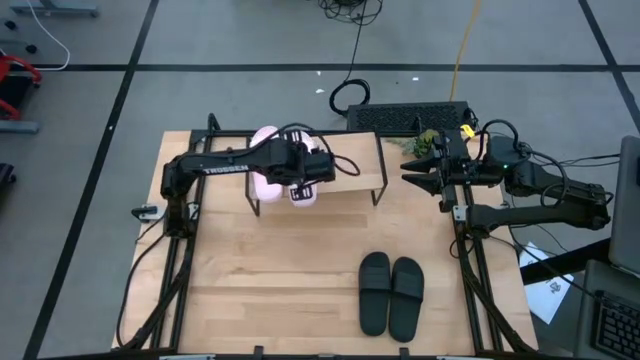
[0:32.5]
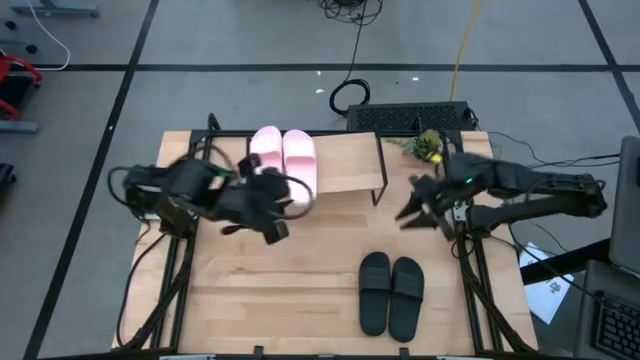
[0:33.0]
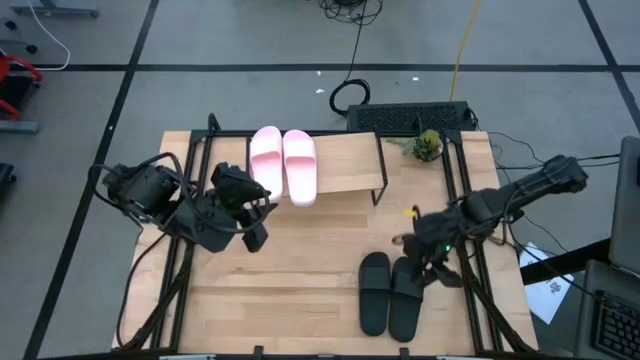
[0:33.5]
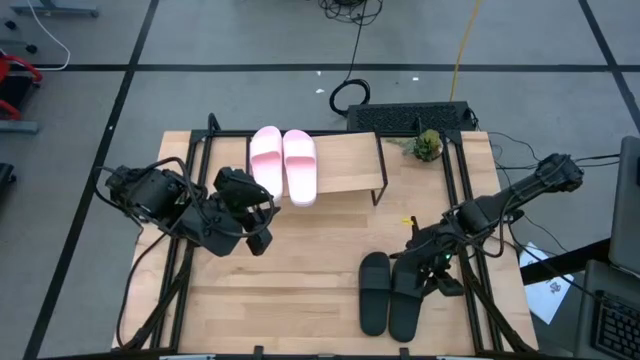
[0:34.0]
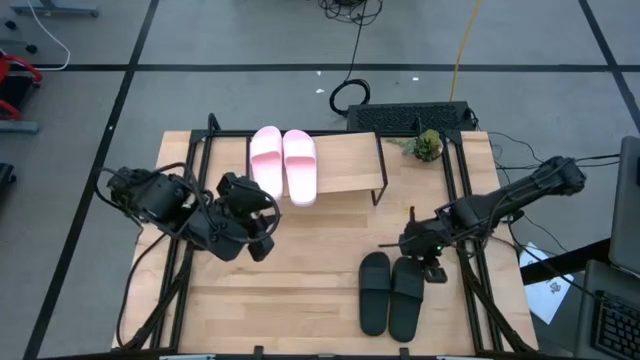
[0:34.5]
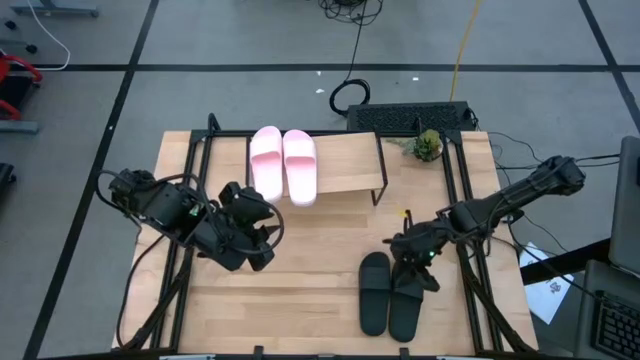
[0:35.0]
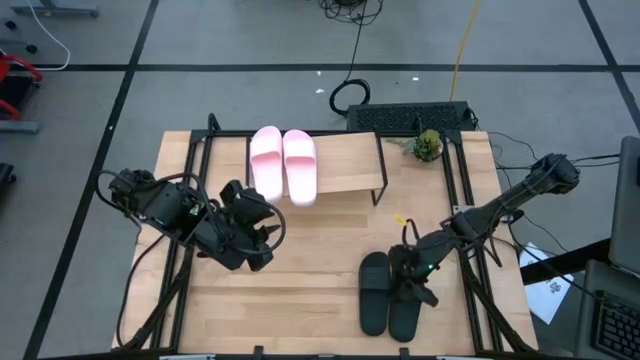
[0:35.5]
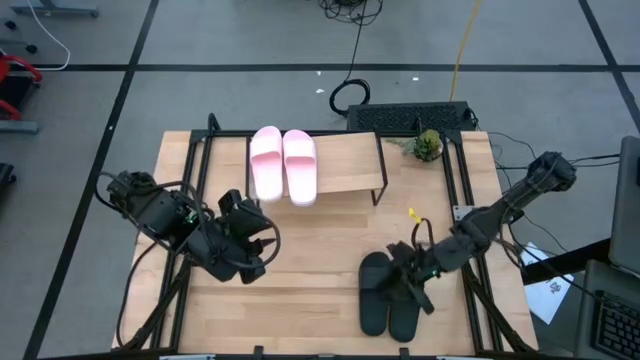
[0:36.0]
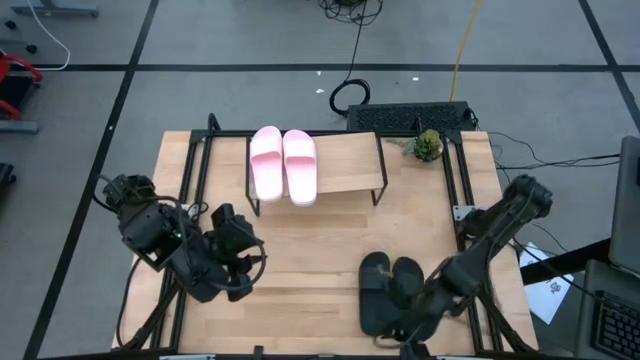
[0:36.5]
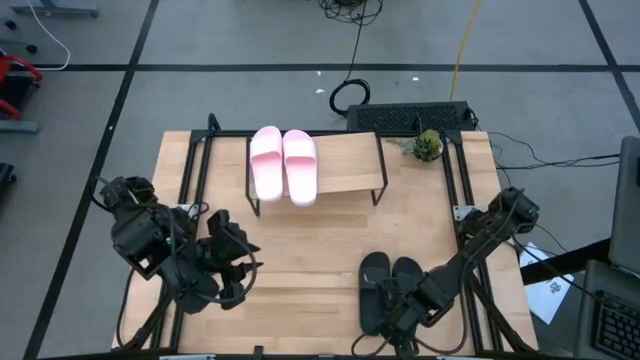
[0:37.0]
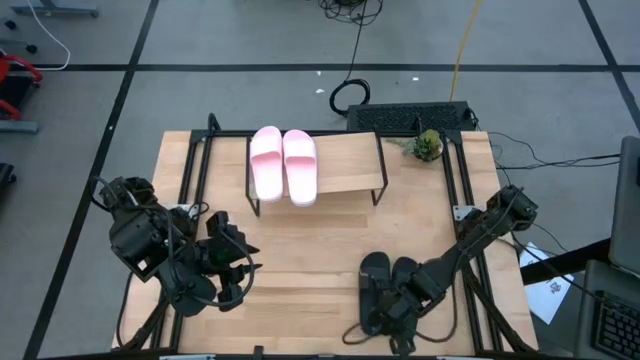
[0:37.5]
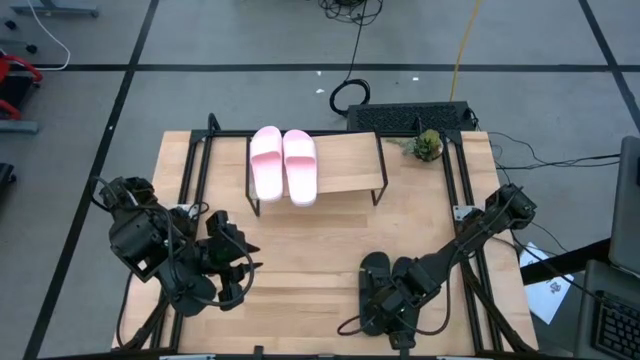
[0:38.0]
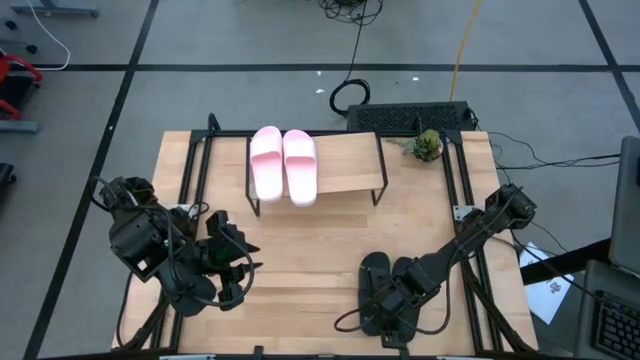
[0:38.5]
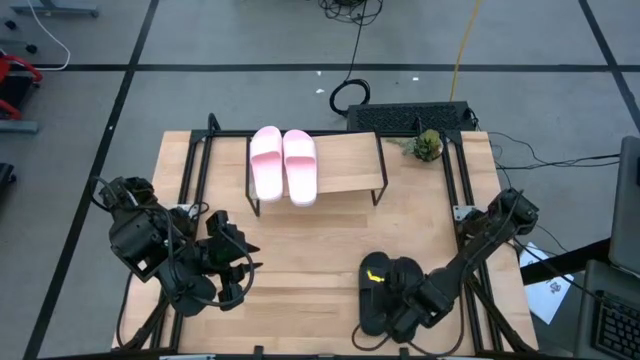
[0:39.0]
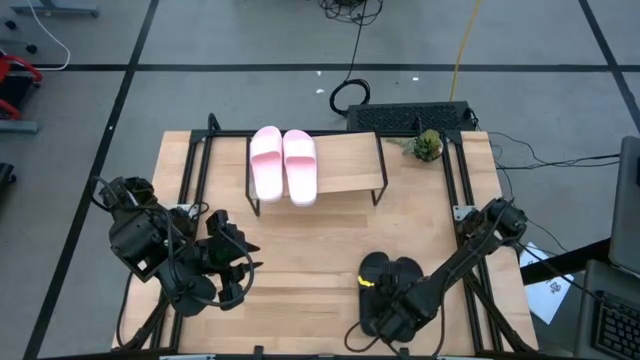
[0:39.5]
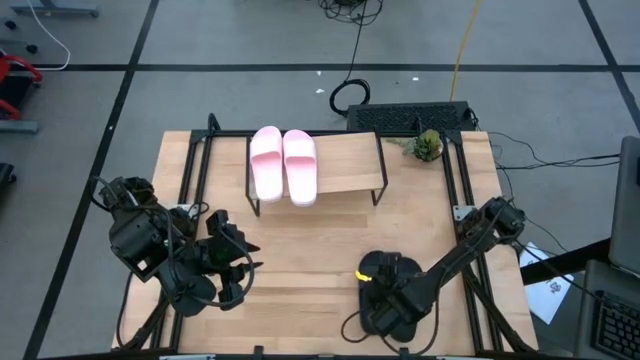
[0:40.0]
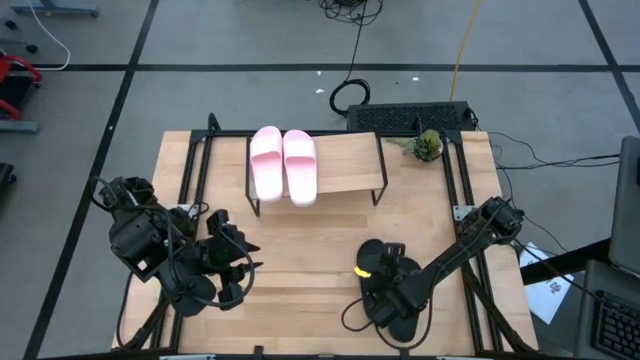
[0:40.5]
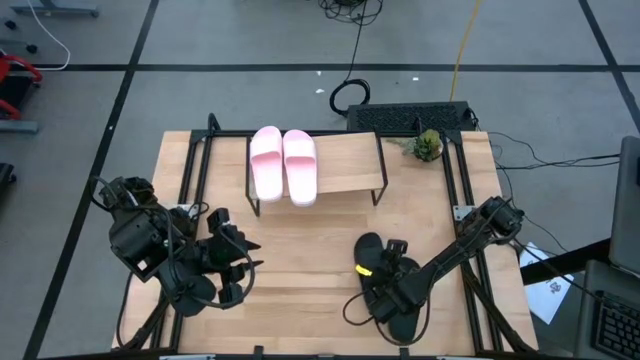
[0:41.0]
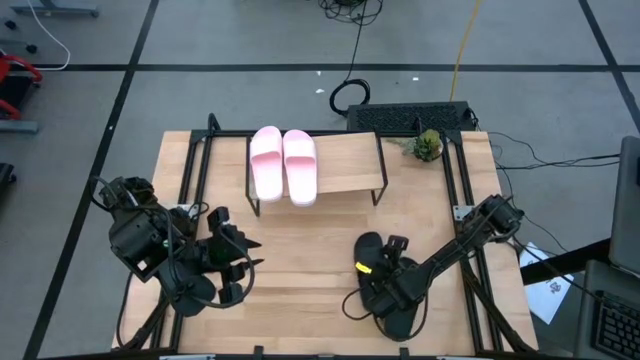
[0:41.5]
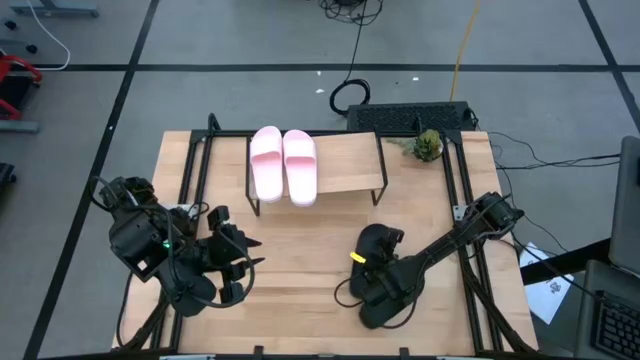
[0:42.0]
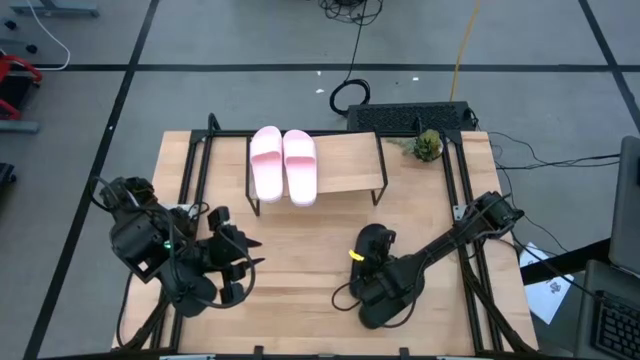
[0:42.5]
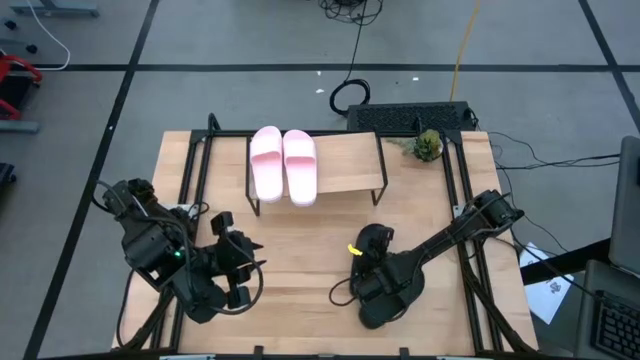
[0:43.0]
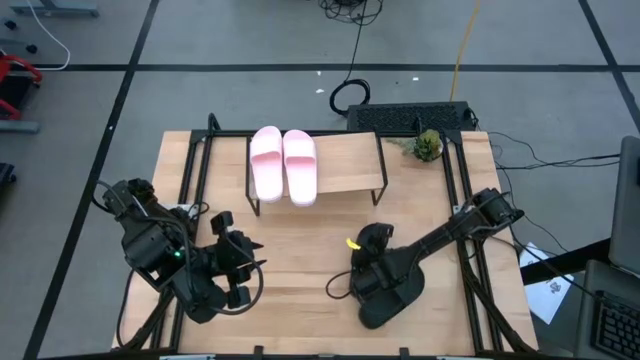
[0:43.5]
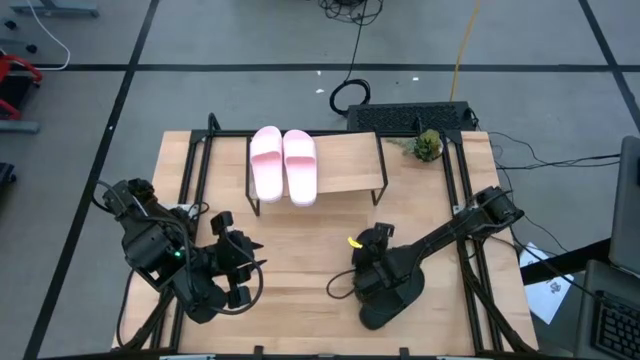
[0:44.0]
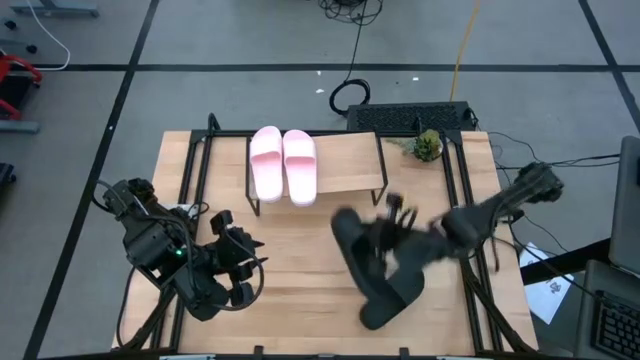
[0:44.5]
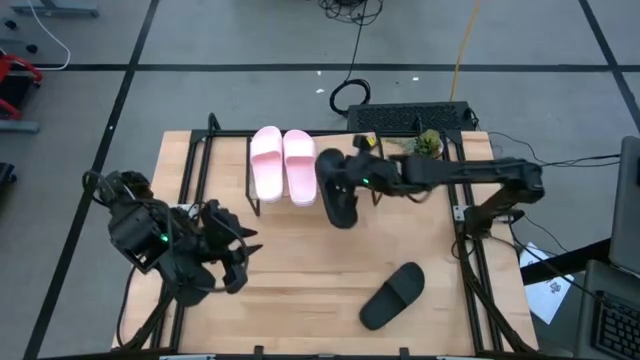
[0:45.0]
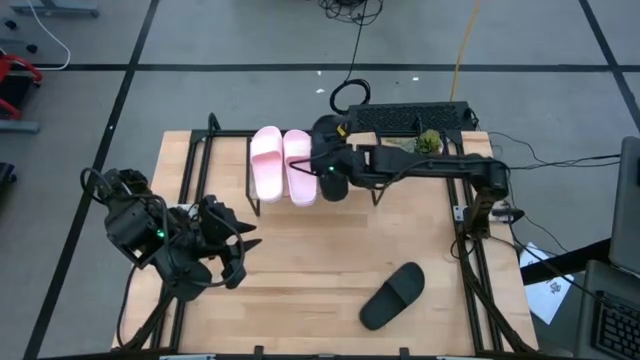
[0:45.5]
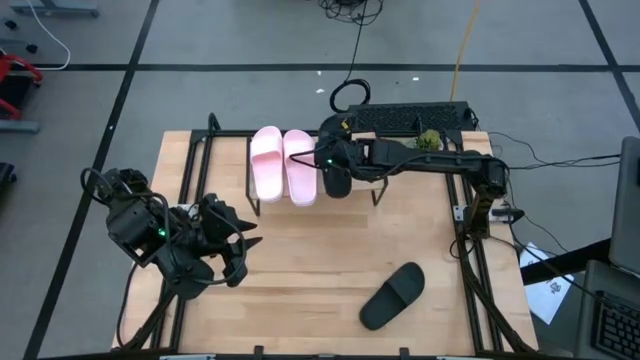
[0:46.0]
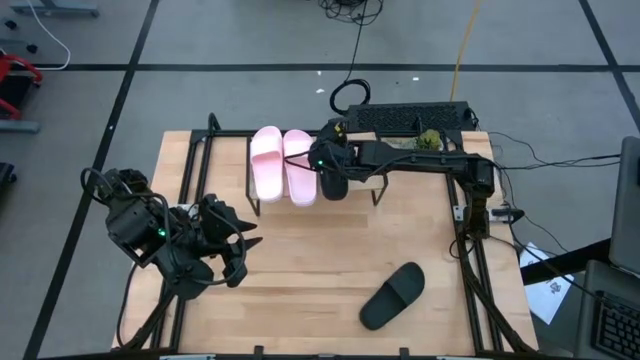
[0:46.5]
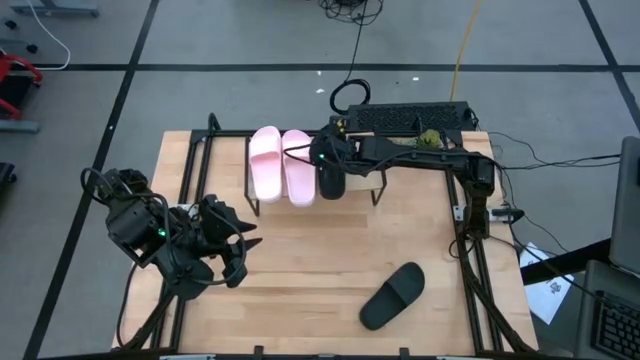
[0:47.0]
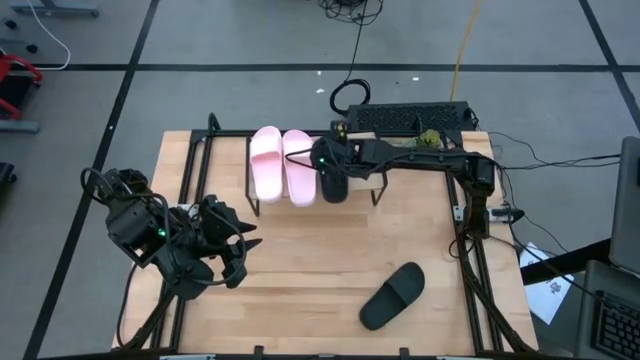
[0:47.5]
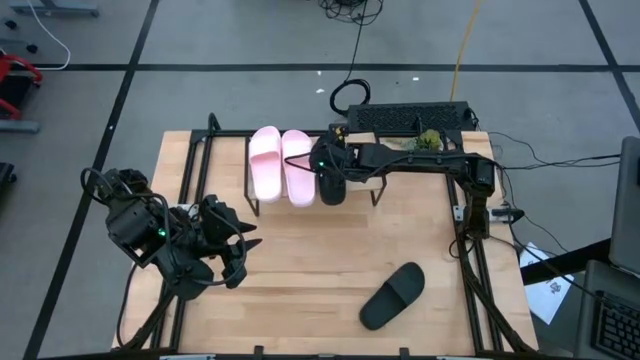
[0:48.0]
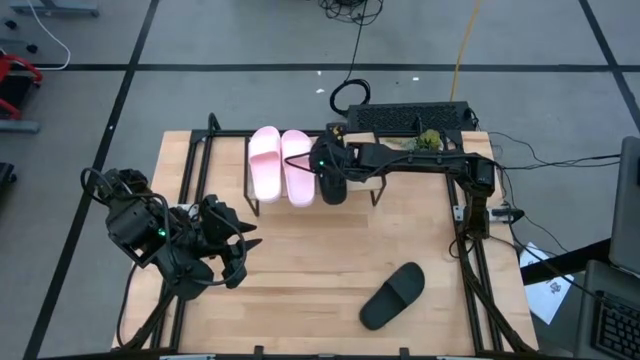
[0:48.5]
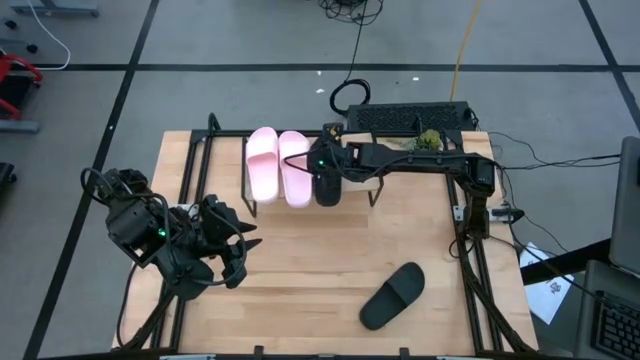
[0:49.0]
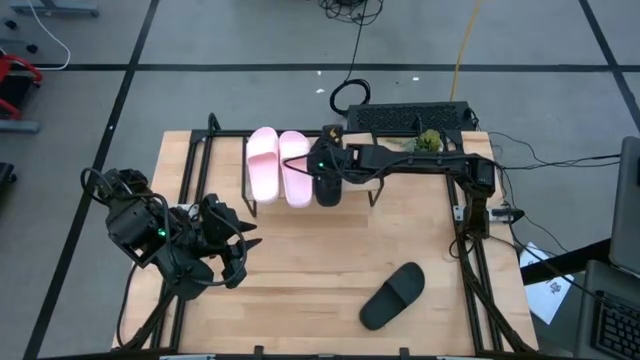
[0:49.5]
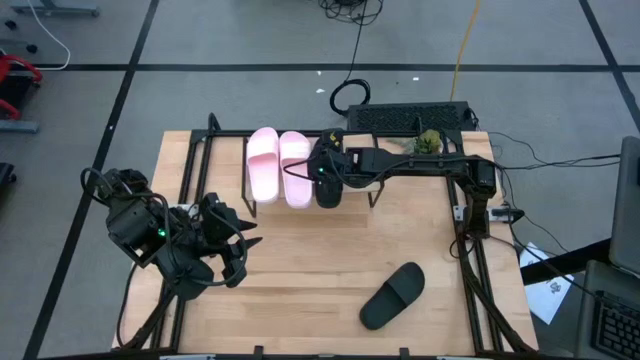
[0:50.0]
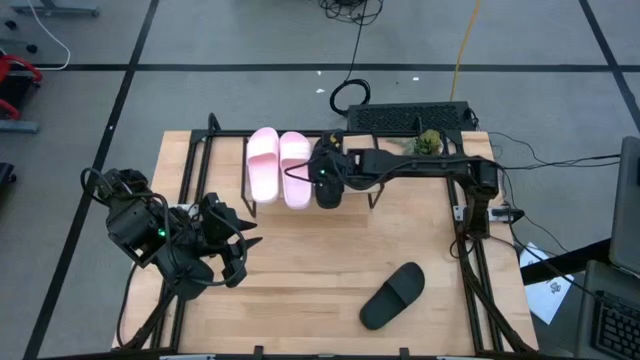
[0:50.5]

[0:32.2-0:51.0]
Task: Pick and place slides into the shelf
Put the left black slide on the shelf

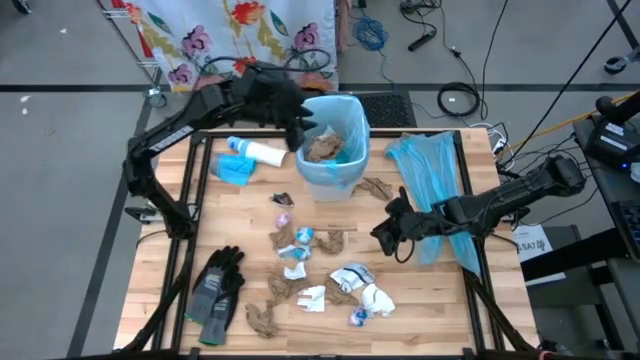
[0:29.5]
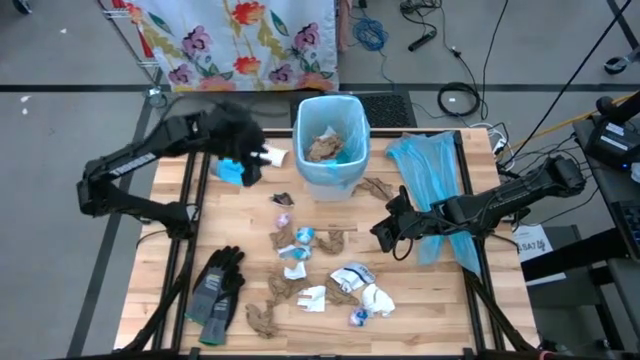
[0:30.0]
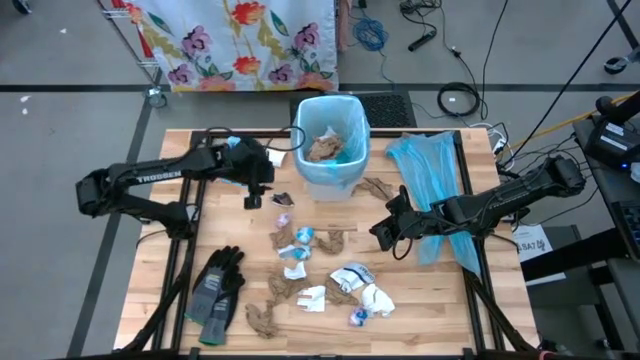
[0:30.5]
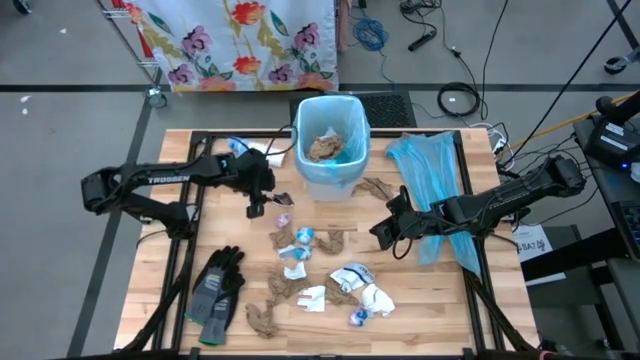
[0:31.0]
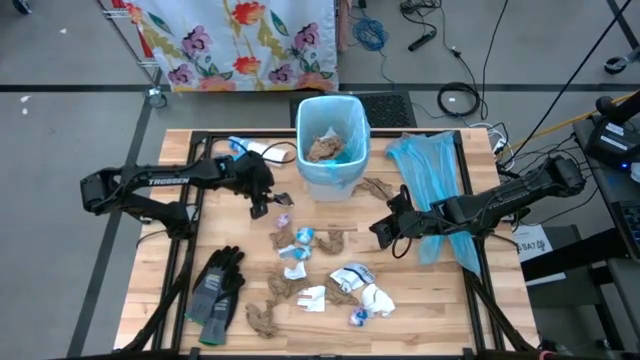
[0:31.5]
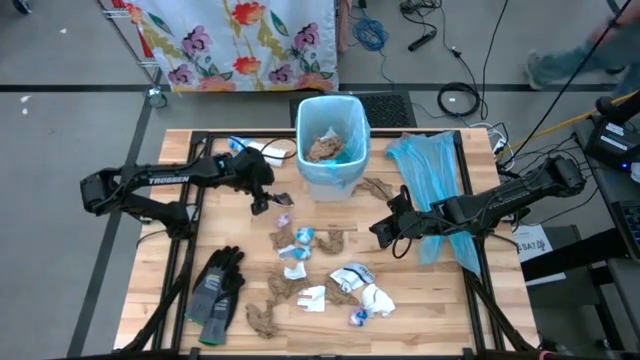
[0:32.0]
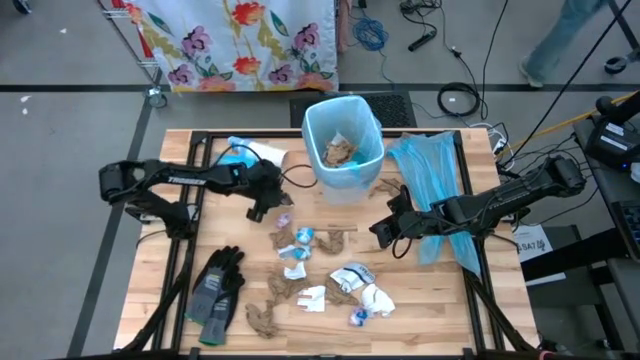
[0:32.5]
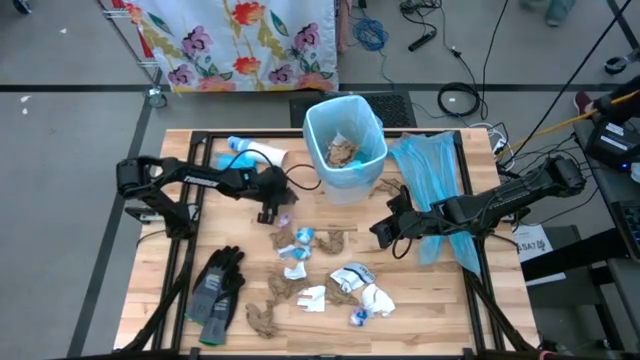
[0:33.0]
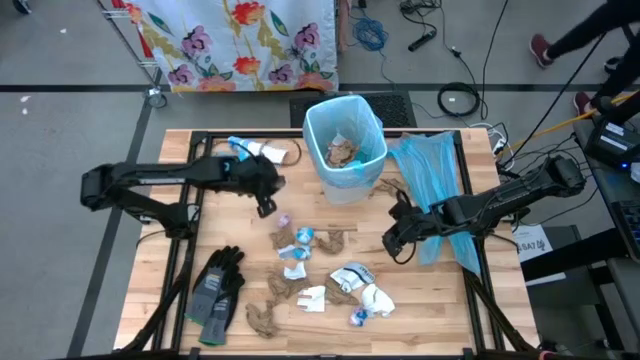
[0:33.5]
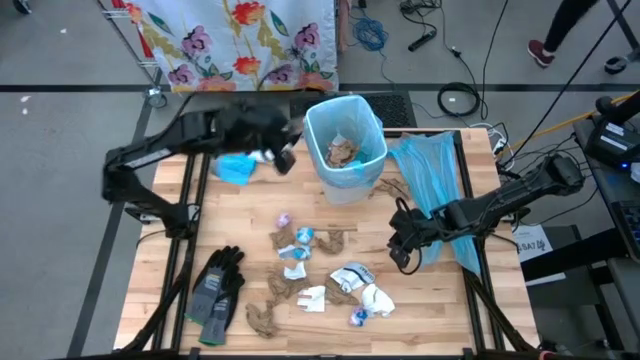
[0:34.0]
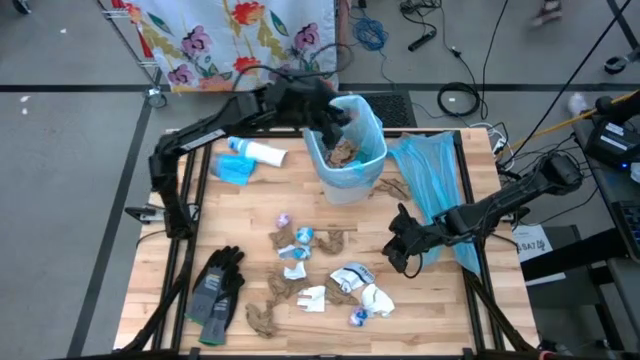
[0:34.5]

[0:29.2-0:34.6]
Task: place trash/remove bag and relplace
Put the brown paper into the trash bin
